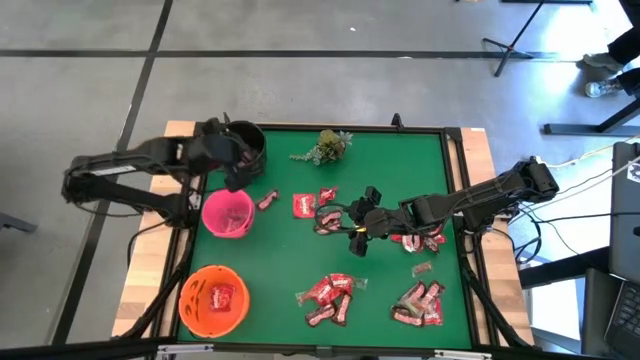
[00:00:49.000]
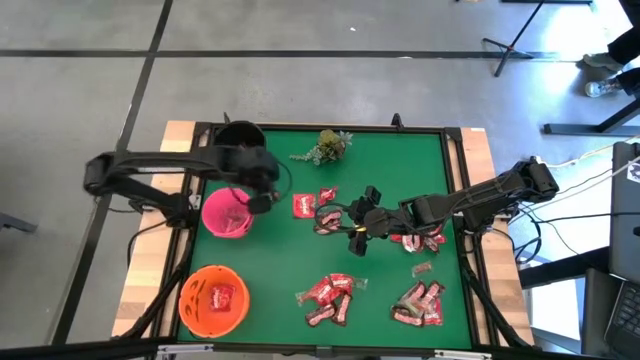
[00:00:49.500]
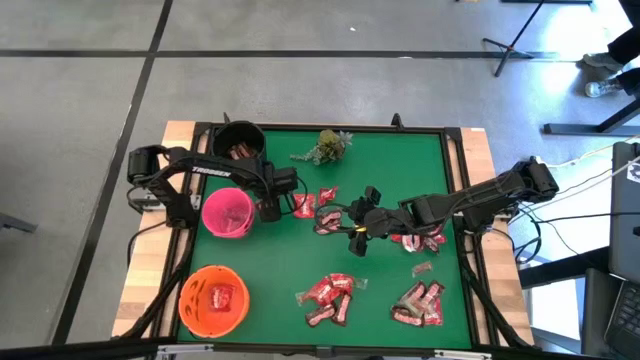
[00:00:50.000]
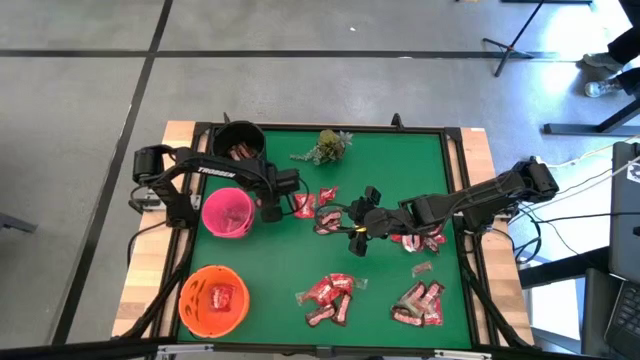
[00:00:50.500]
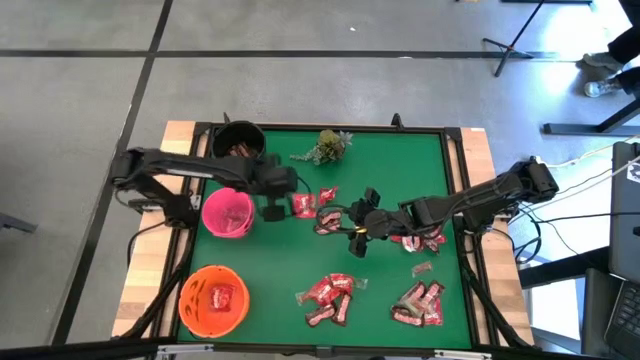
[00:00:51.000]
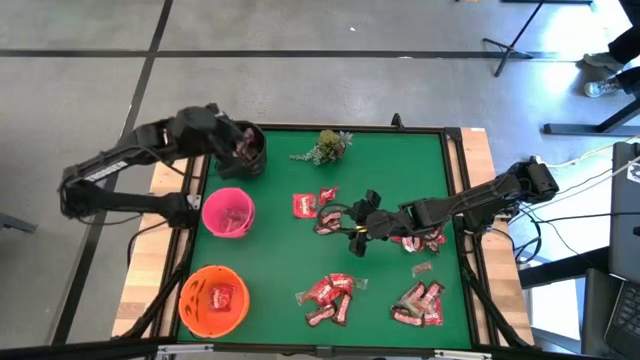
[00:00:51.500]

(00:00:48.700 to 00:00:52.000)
Task: Sort candy
Put the brown chocolate into the black bucket

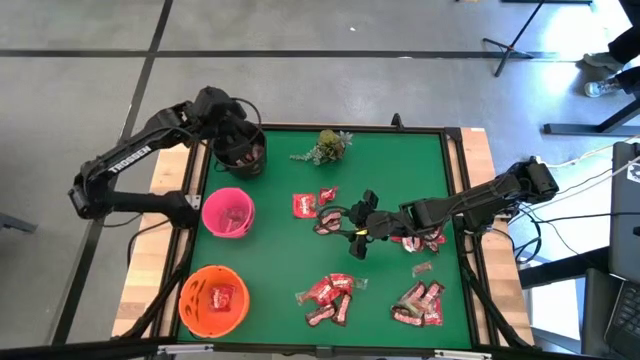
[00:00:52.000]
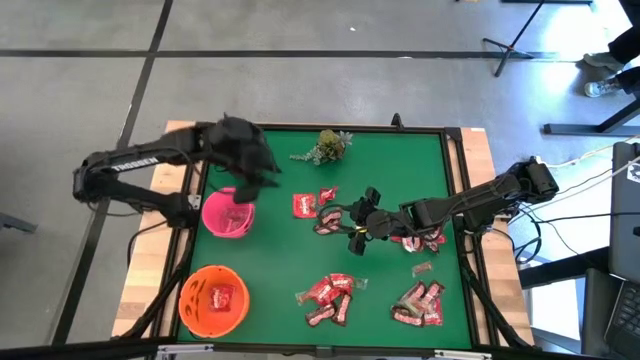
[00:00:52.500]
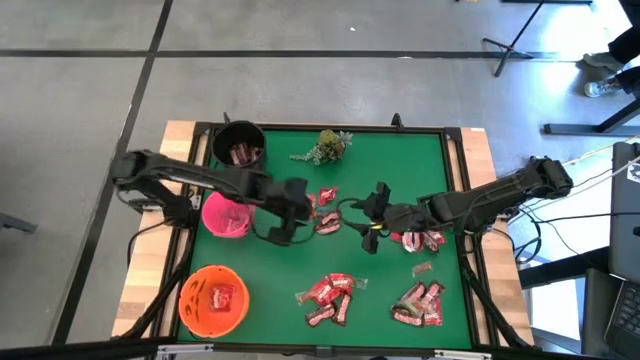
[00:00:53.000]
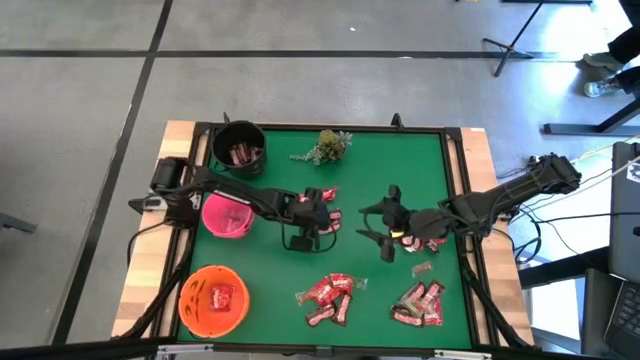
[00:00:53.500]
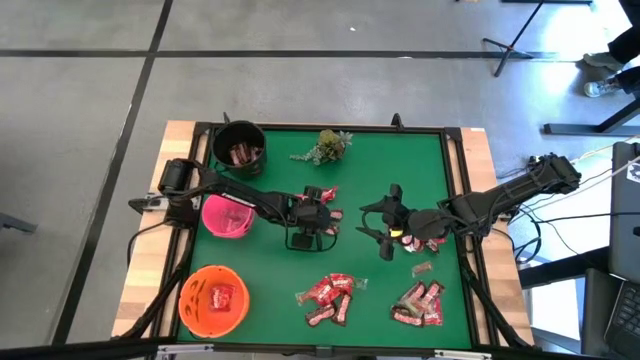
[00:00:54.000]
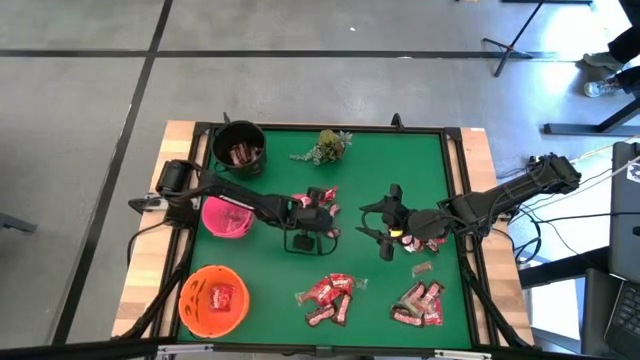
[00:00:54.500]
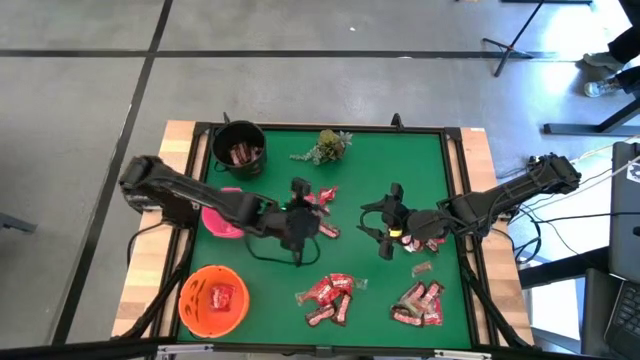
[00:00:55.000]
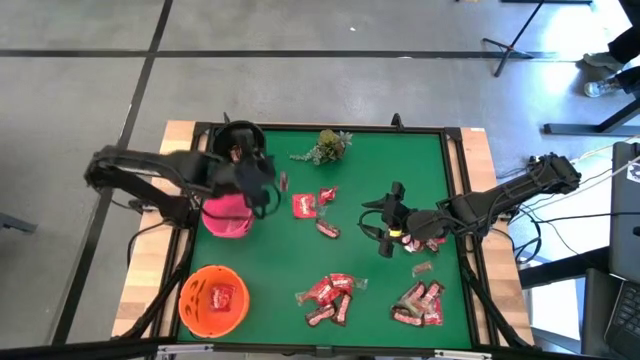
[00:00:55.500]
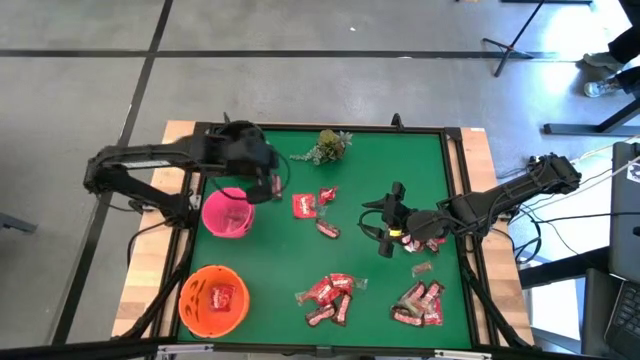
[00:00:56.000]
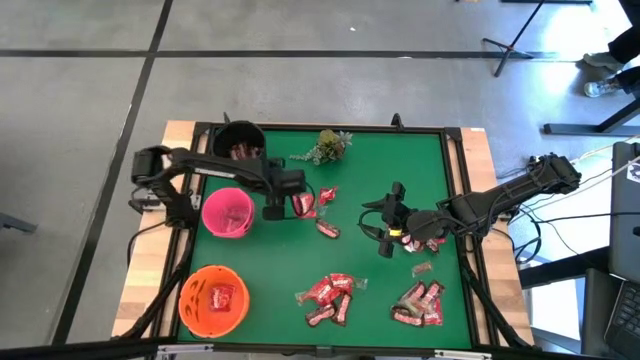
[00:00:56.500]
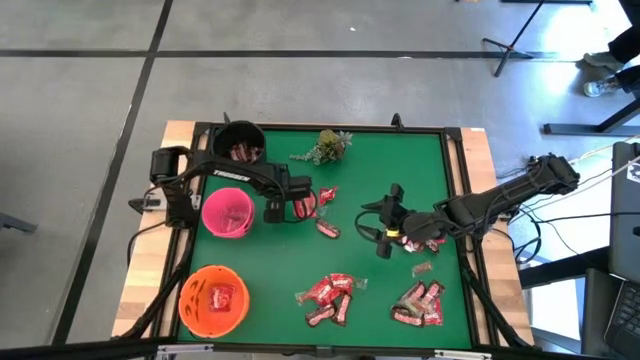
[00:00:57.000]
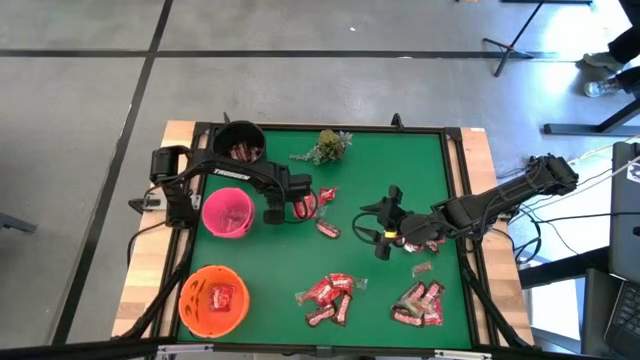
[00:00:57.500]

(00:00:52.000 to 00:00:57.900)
Put the brown chocolate into the black bucket

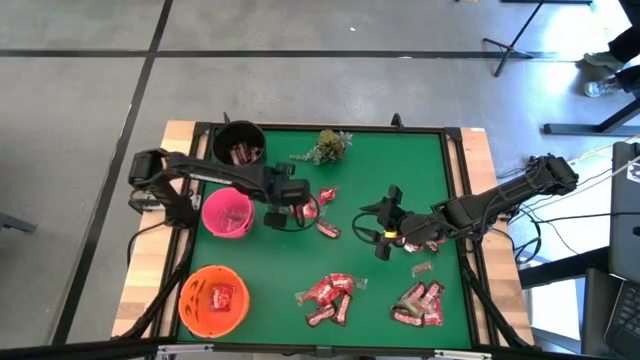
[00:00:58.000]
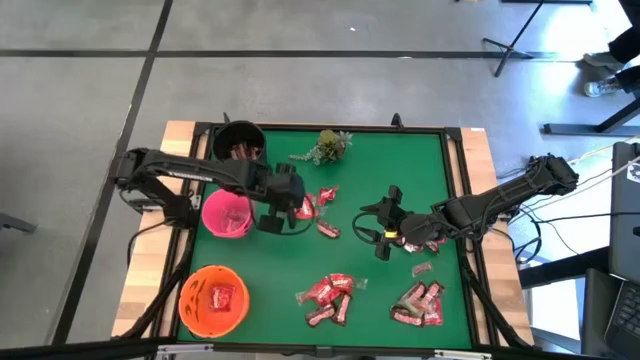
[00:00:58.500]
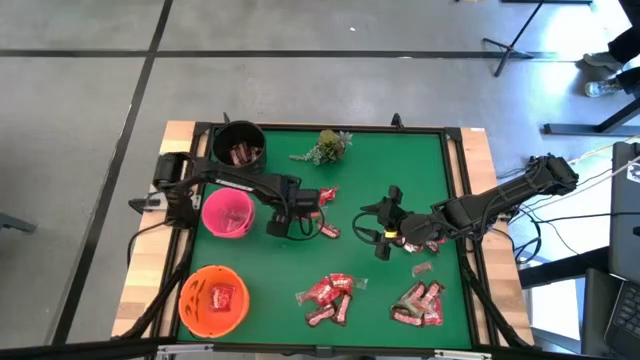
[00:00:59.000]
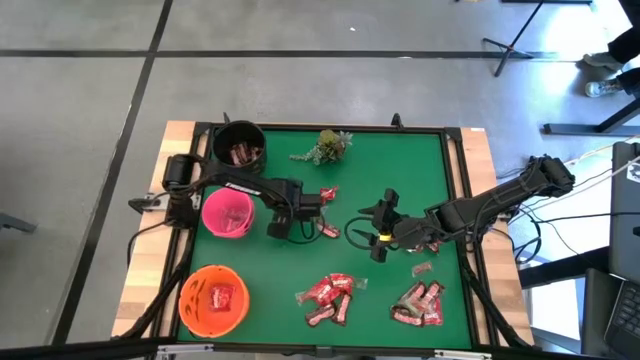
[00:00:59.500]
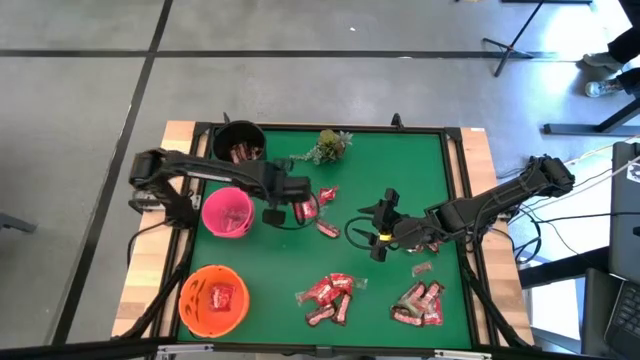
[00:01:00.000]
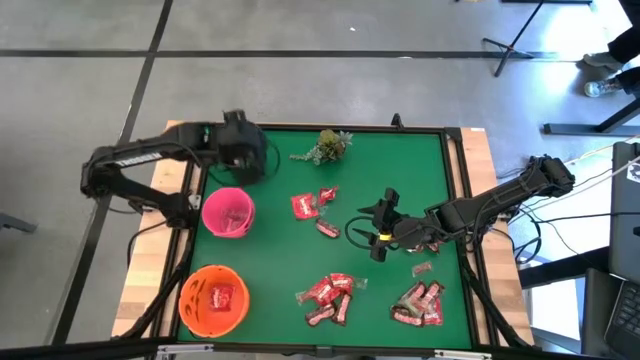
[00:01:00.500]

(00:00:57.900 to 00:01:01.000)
Put the brown chocolate into the black bucket

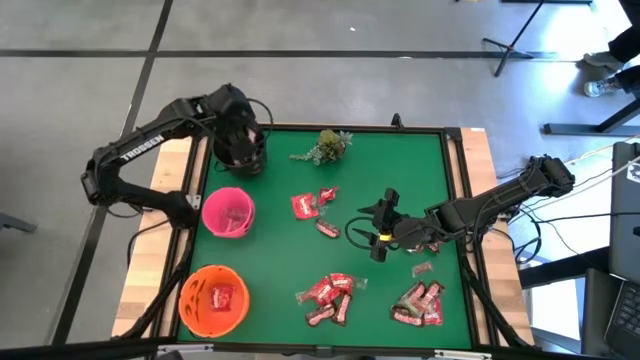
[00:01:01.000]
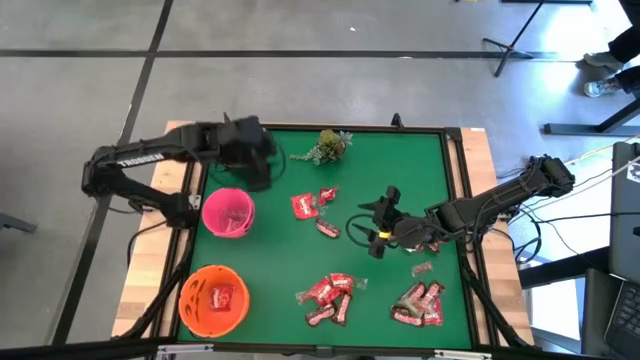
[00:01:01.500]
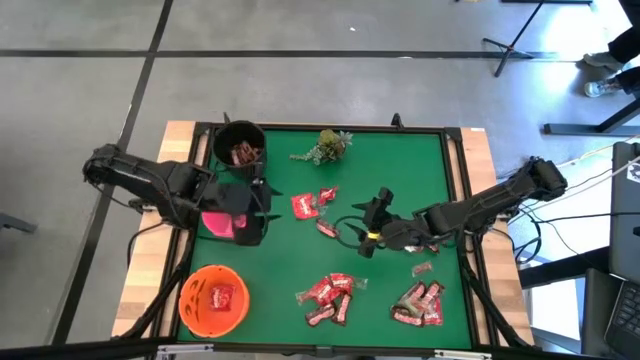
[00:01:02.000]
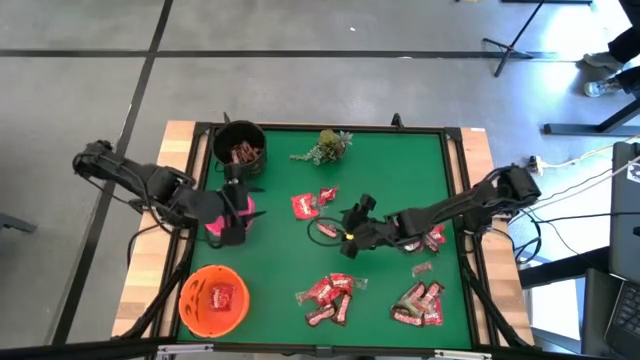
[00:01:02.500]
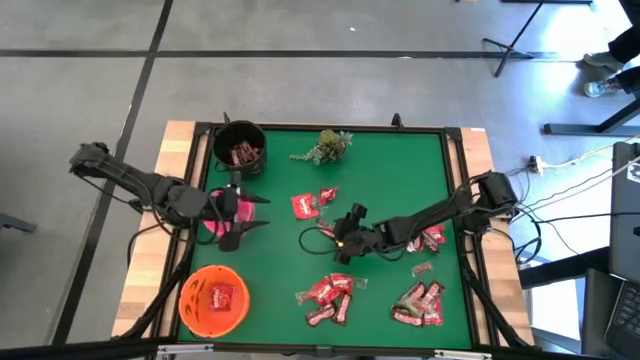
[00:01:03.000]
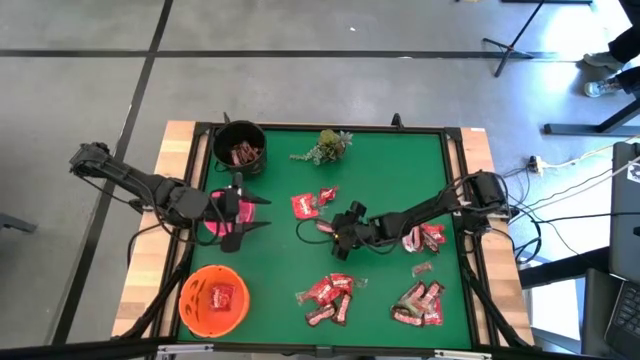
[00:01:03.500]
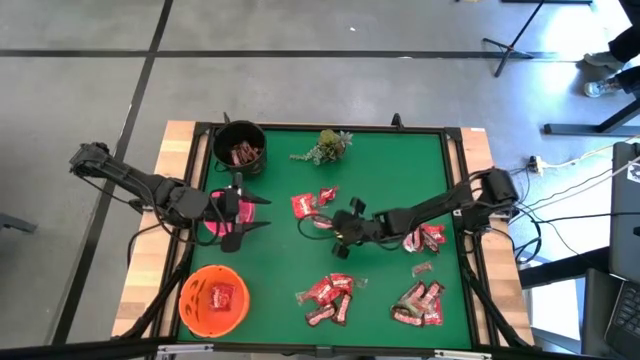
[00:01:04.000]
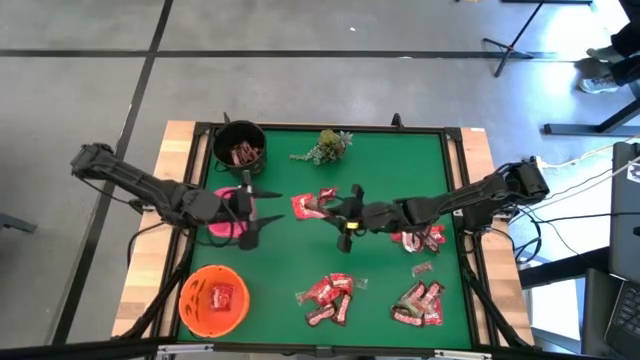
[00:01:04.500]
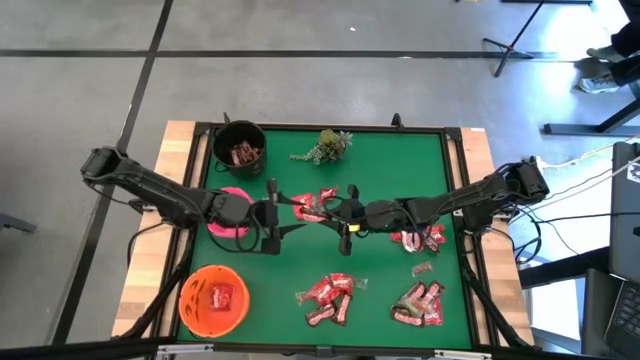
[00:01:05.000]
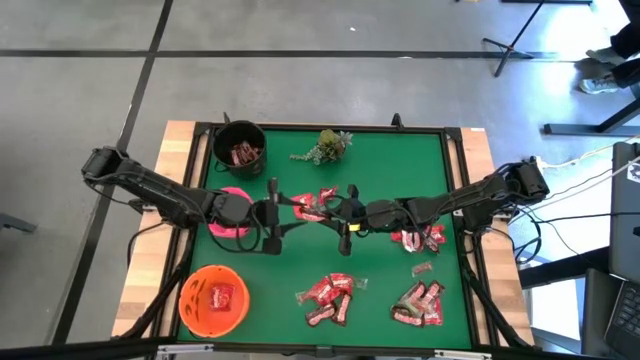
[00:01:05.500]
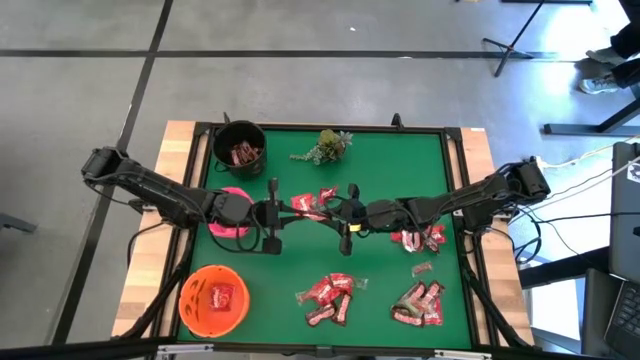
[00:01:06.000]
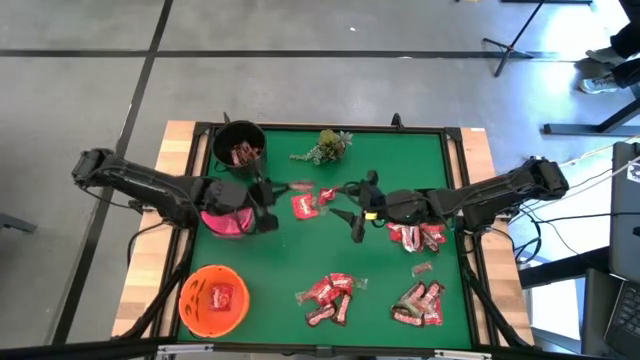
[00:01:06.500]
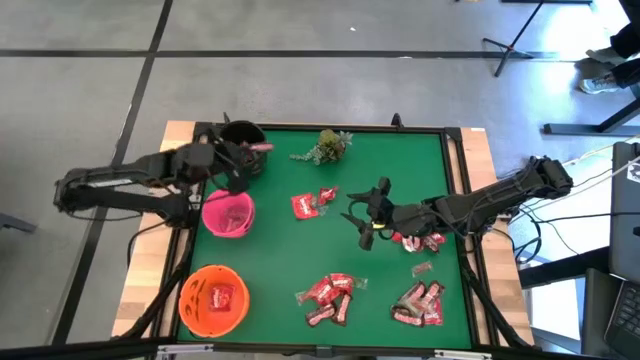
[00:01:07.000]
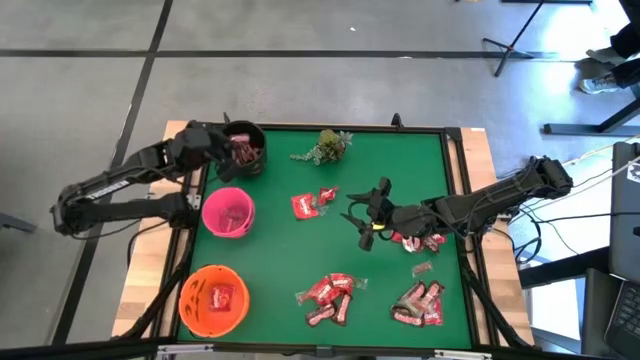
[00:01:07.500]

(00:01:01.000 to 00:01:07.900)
Put the brown chocolate into the black bucket

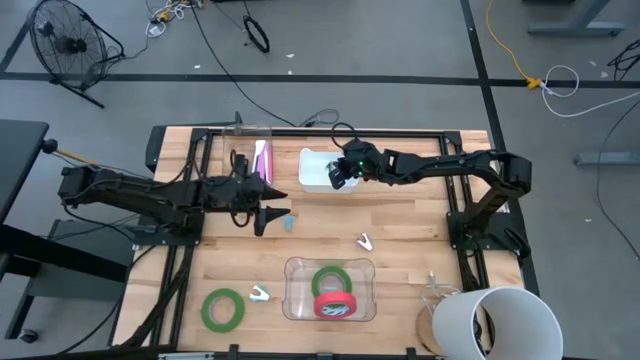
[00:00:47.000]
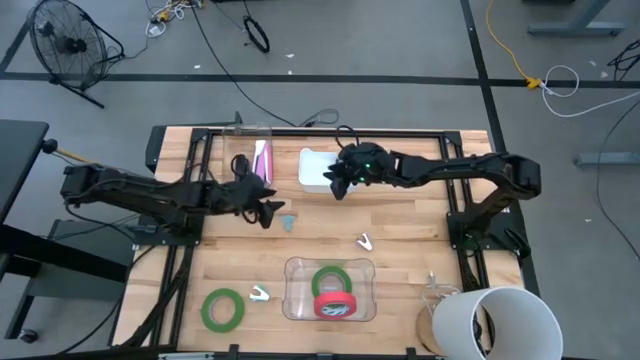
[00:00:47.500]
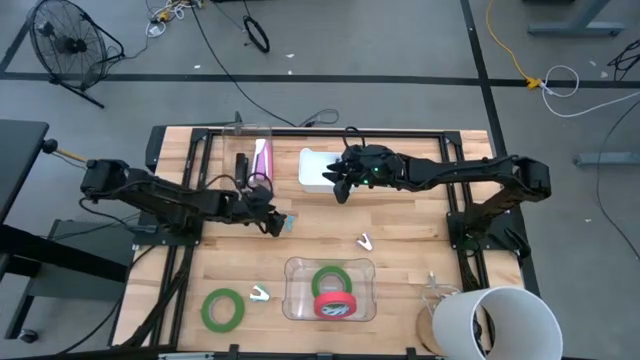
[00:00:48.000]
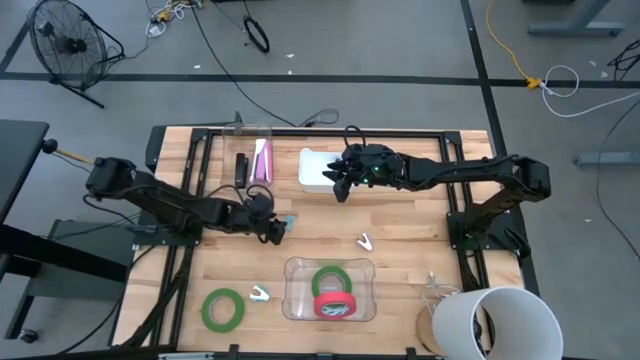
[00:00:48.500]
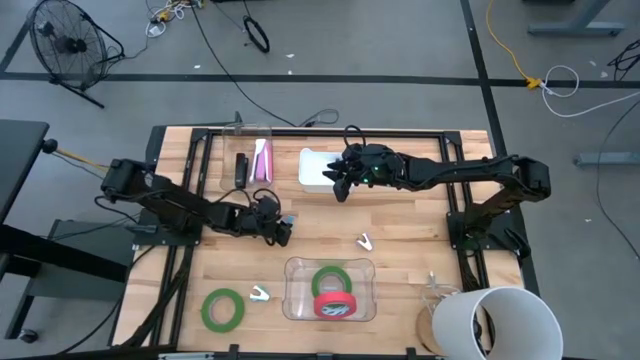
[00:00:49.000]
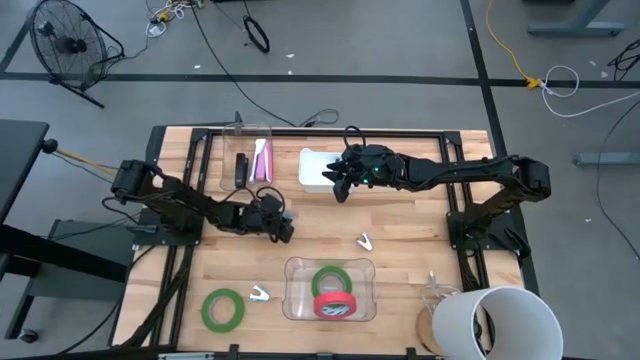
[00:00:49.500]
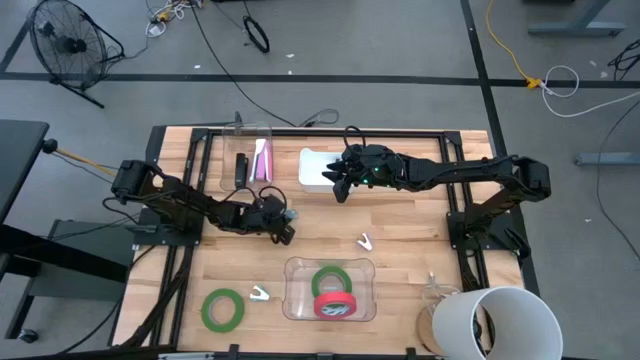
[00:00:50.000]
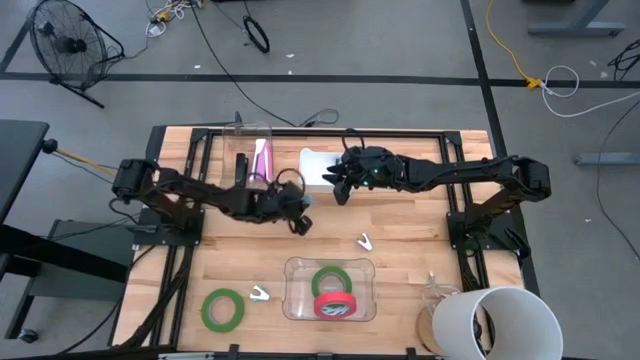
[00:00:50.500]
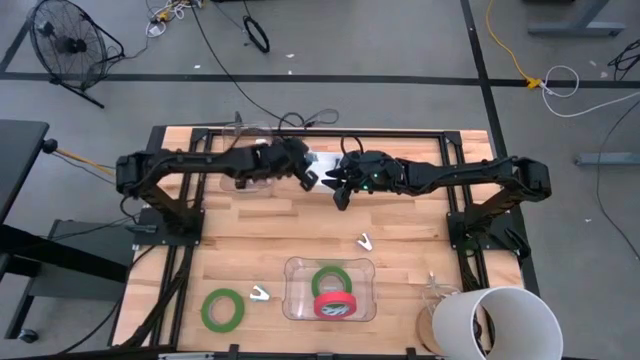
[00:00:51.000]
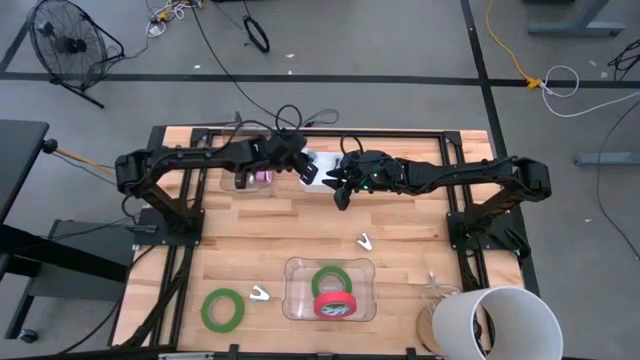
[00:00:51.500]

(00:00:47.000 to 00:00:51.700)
Task: Pick and place Stapler, Stapler remover, tape
Put the blue staple remover into the white bin
